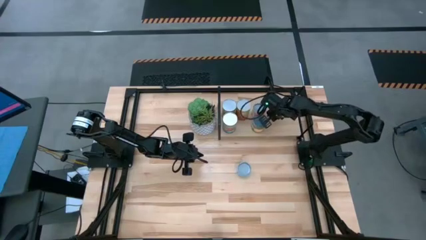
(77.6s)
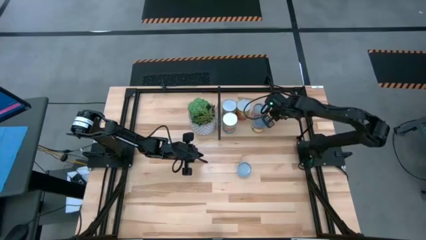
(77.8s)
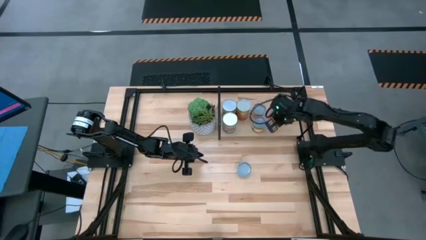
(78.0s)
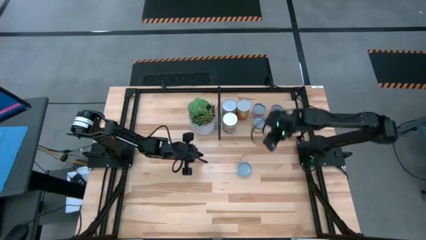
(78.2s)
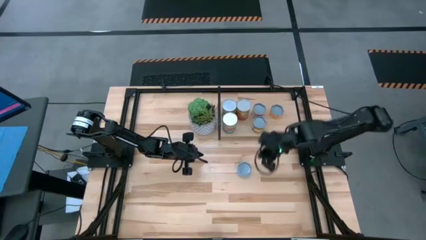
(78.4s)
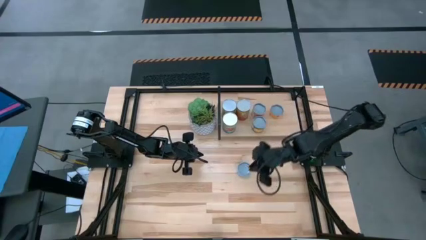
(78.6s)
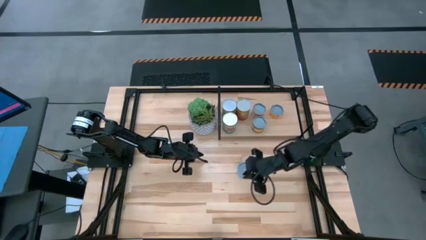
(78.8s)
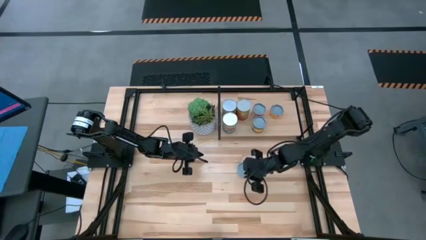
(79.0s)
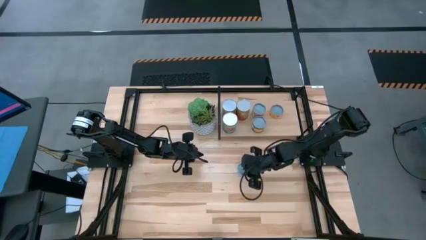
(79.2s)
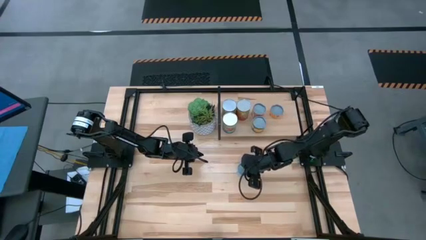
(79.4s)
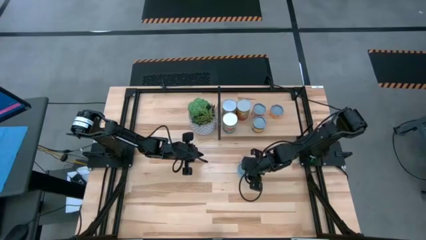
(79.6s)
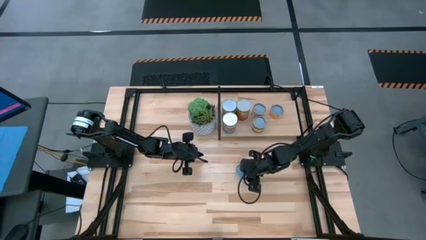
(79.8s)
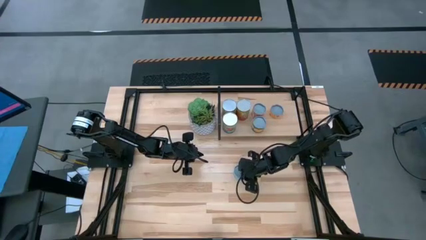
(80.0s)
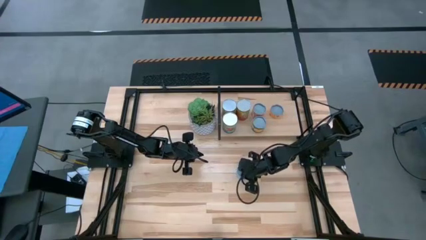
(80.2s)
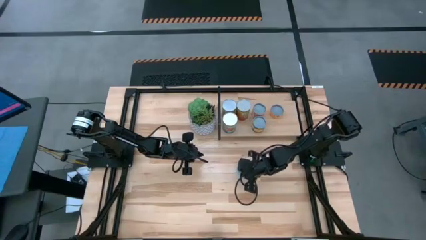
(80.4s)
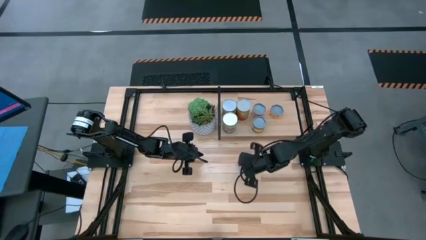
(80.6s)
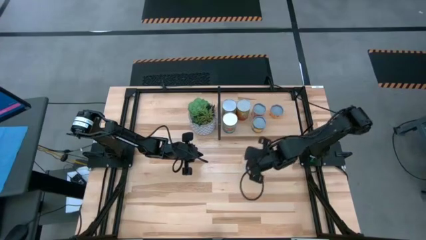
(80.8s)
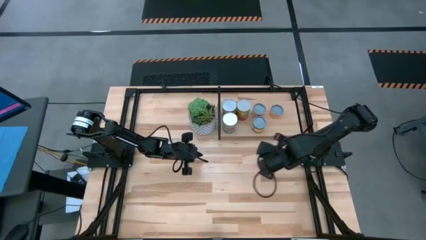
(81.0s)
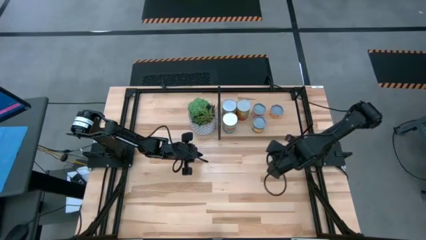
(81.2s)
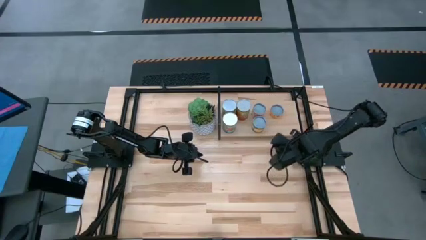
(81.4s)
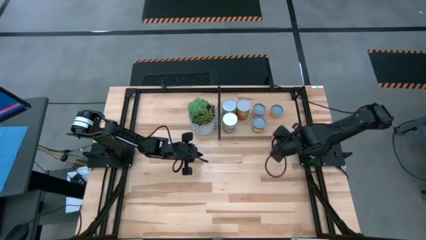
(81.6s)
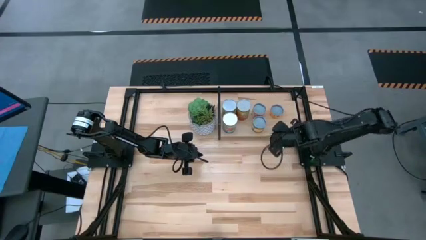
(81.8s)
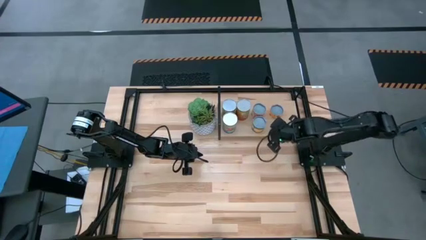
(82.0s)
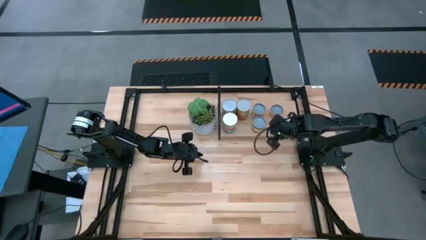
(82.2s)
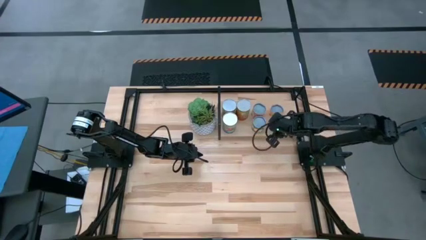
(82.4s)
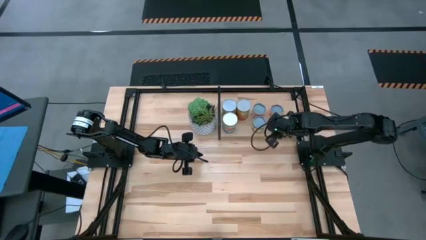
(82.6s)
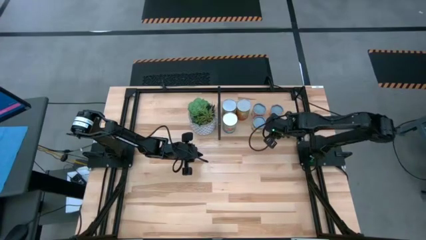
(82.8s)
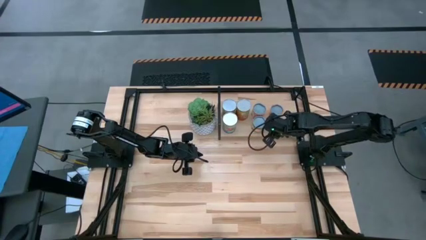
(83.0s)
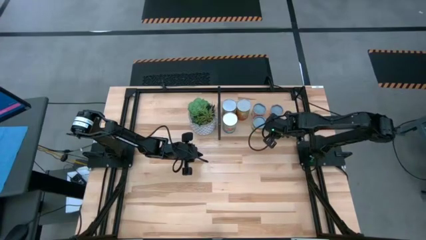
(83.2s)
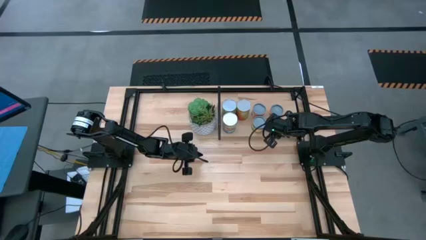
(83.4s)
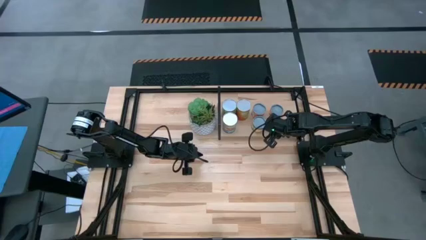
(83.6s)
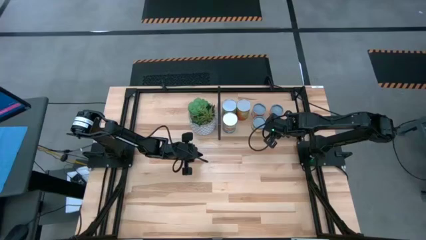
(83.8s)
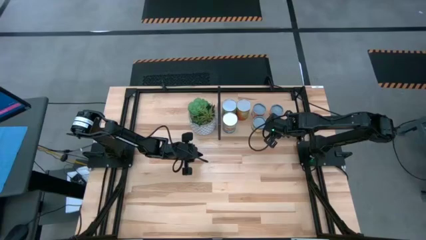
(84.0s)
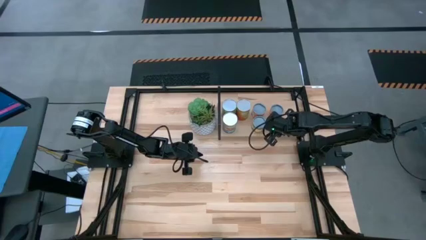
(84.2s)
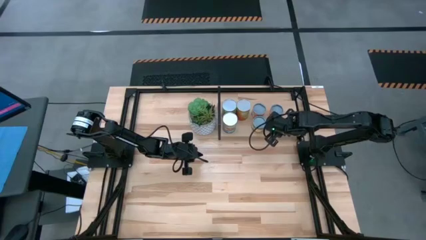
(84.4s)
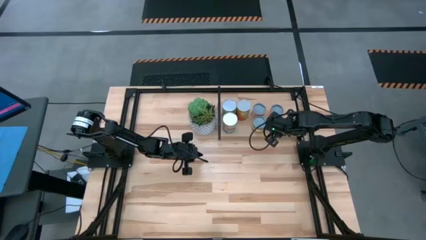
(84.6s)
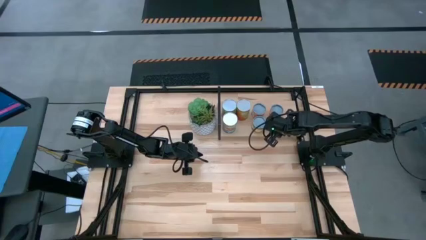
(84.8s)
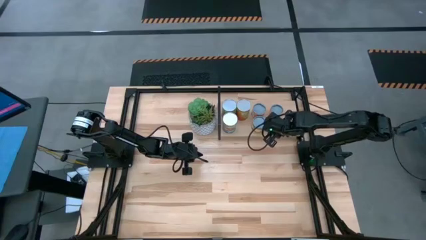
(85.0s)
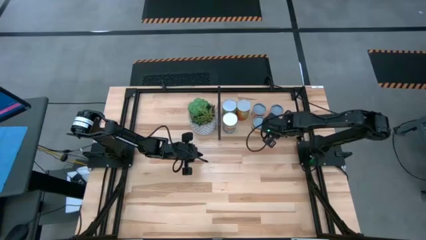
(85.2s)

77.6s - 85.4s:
Task: Pick and place cans onto a shelf
Put the canned tuna on the shelf

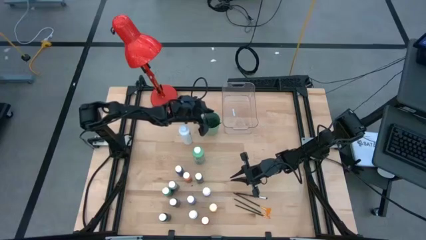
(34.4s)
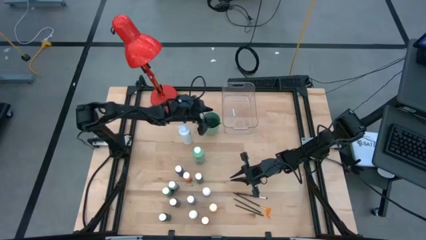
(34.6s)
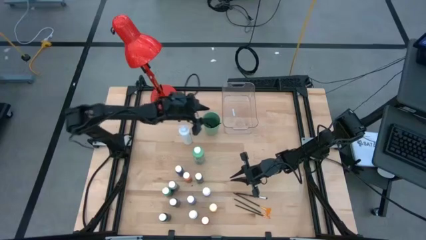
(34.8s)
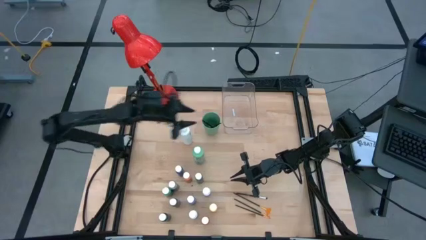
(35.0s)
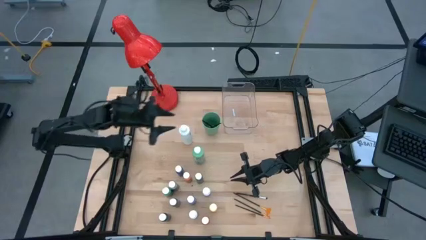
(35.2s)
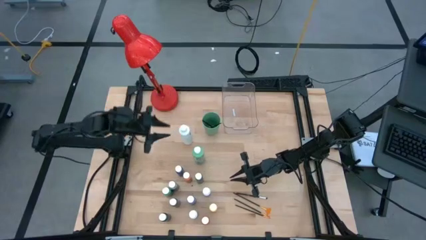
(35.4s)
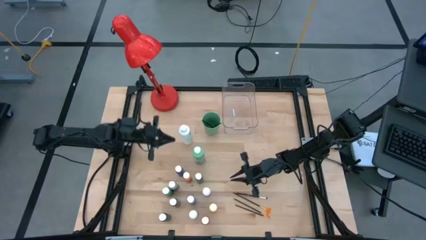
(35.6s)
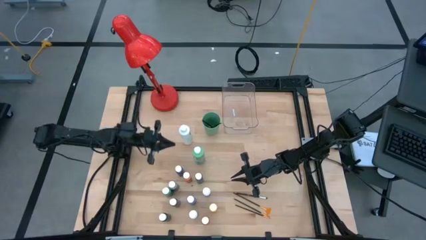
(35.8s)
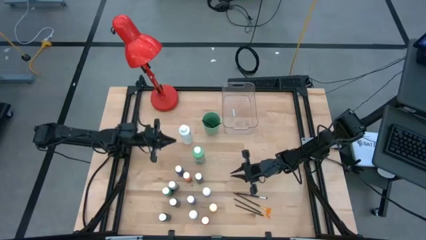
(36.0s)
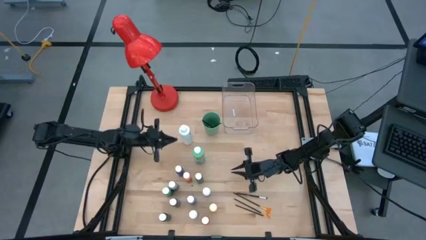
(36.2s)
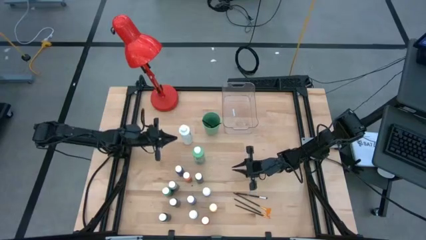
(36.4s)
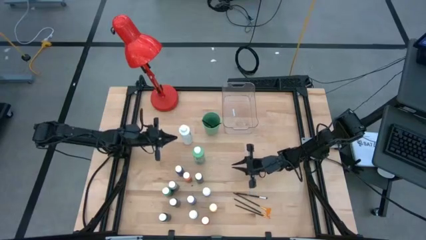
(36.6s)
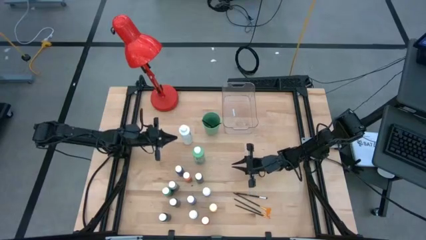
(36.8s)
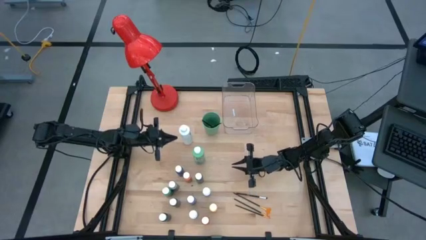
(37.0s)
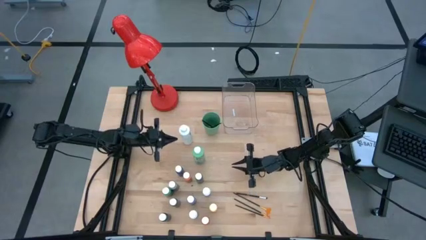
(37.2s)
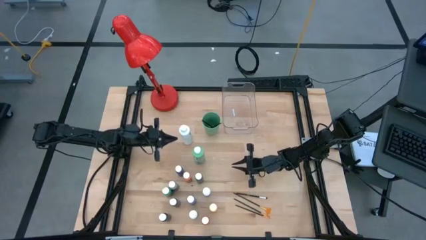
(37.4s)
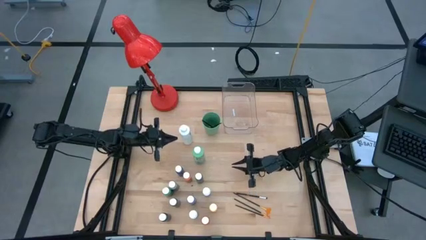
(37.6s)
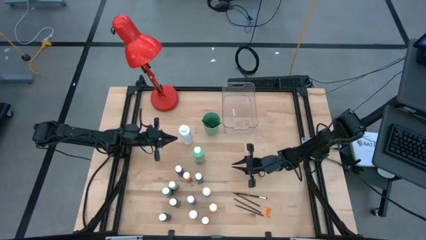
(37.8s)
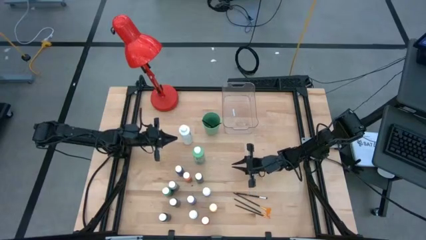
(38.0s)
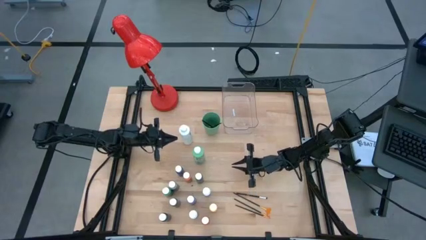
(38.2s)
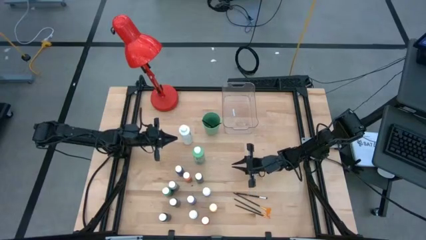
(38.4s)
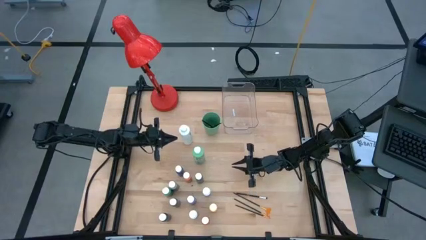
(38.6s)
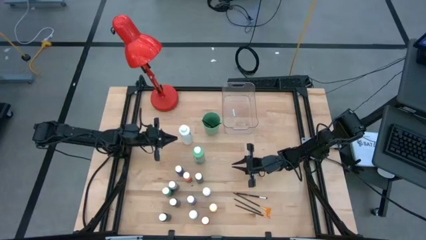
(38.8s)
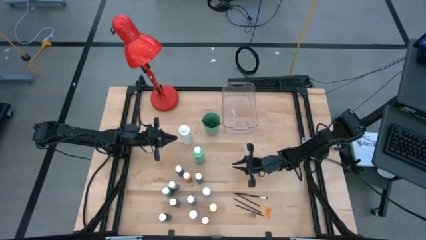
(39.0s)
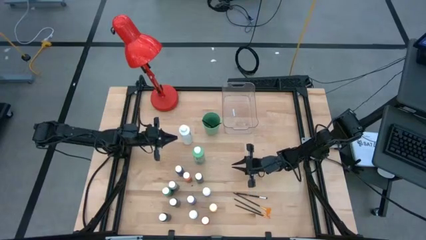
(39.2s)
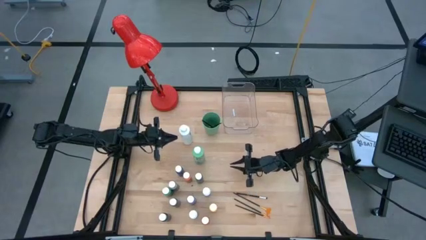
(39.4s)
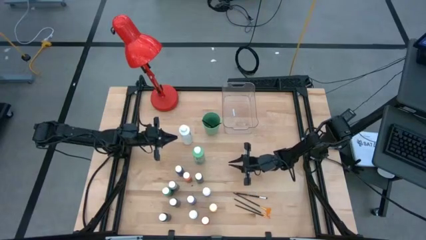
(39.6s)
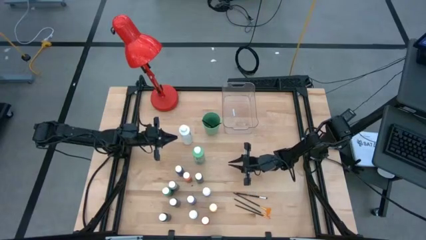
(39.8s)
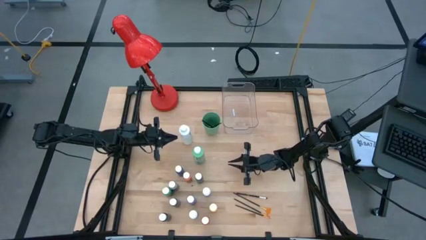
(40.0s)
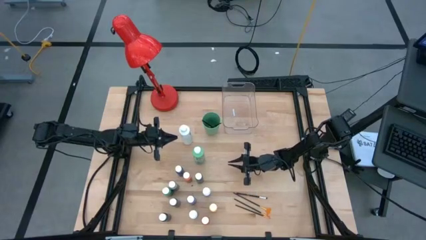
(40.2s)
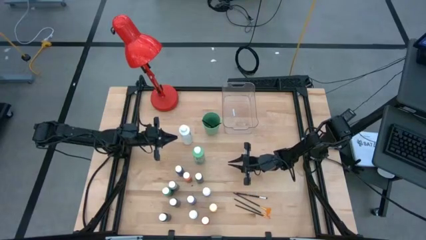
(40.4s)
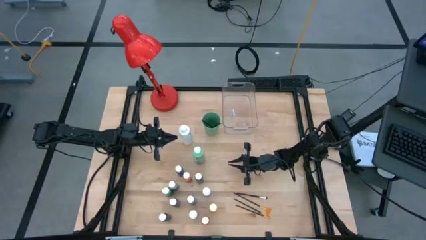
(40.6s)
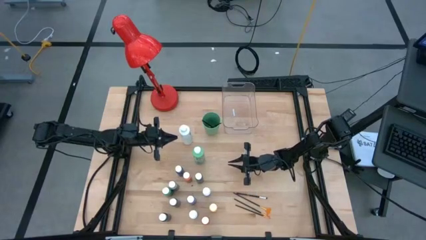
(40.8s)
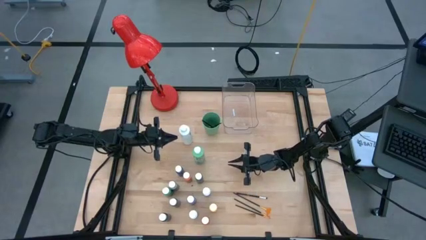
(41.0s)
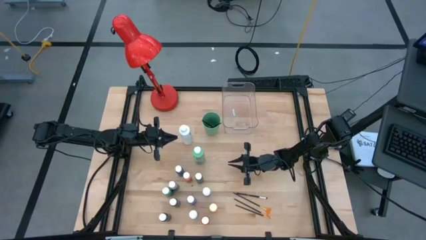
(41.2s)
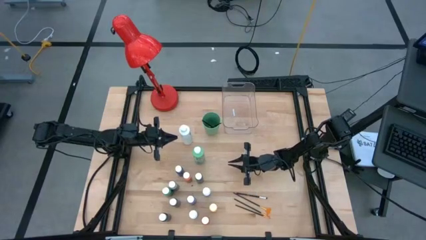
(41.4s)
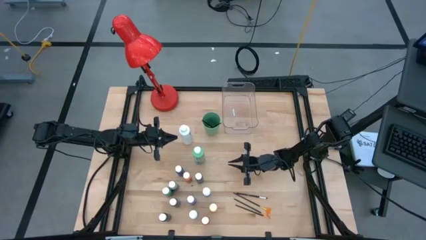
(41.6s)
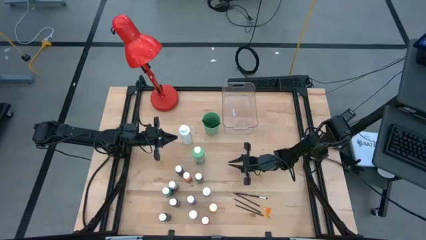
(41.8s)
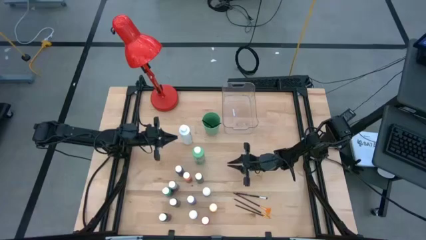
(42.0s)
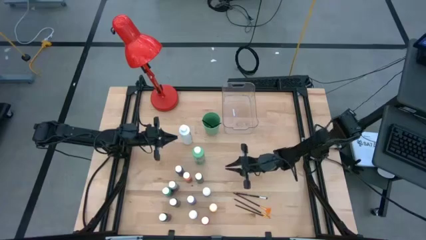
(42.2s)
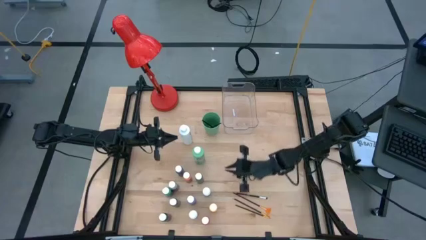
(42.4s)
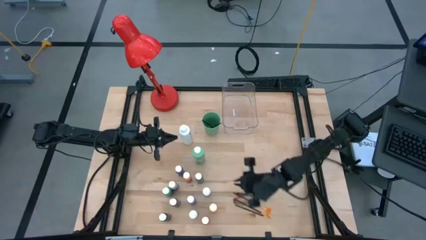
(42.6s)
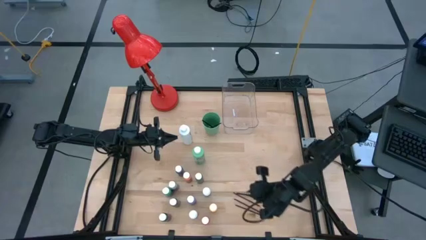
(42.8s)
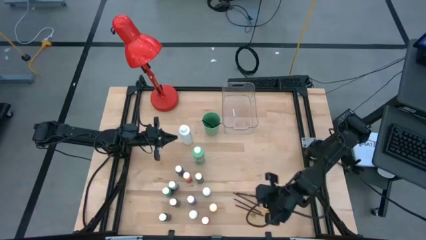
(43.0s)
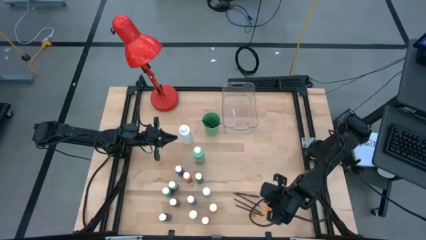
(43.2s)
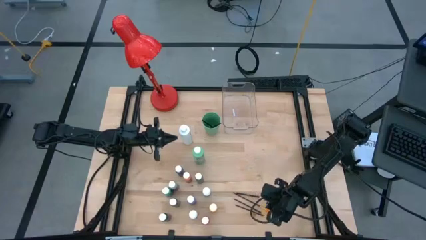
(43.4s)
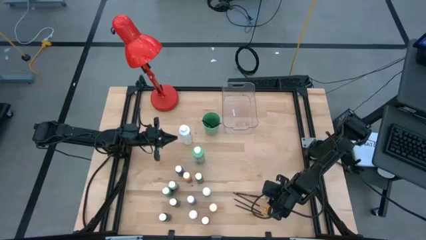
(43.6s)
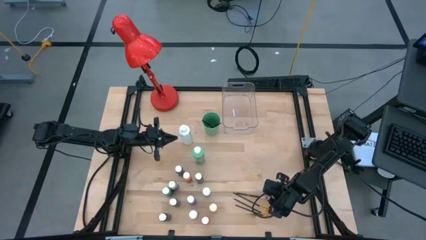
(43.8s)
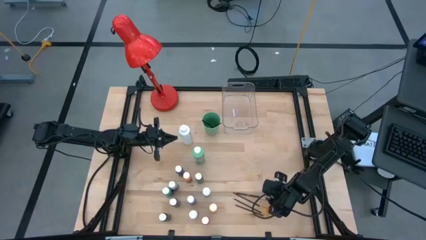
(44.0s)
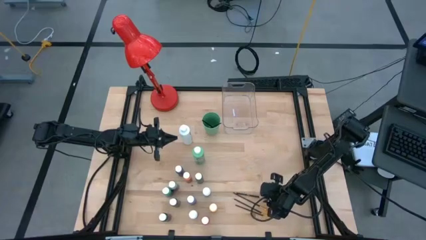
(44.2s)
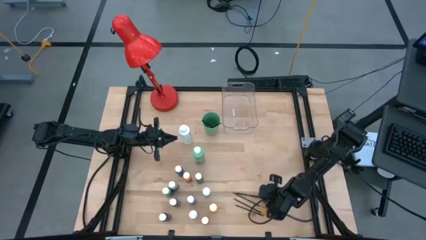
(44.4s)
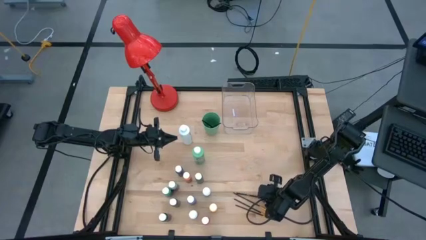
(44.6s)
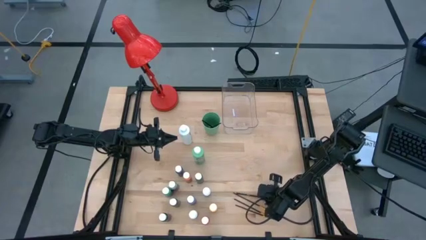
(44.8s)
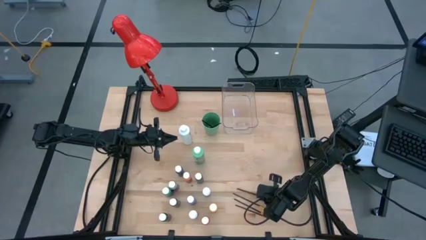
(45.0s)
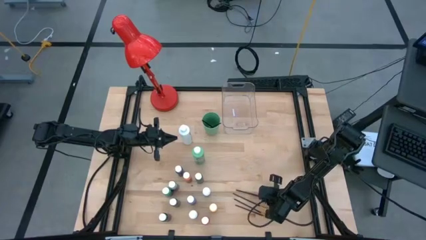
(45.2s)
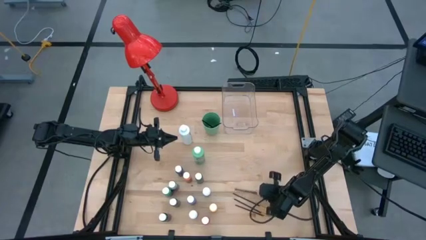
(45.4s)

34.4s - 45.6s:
Task: Pick & Place Paint Supplies
Put the silver paint brush into the green cup
